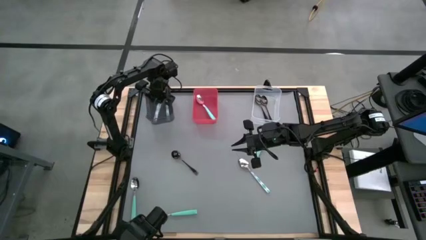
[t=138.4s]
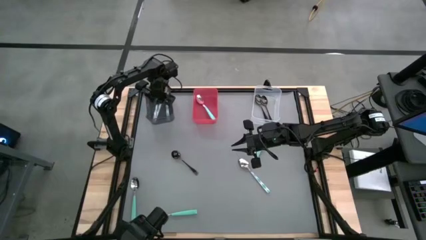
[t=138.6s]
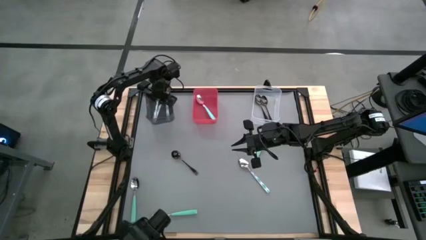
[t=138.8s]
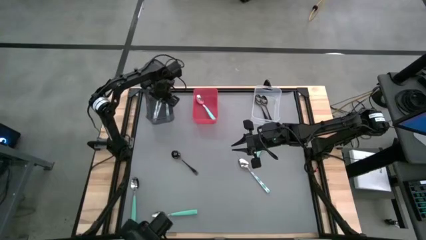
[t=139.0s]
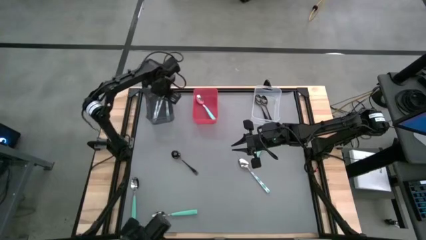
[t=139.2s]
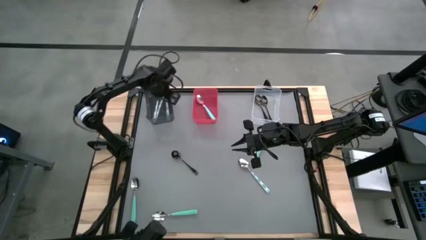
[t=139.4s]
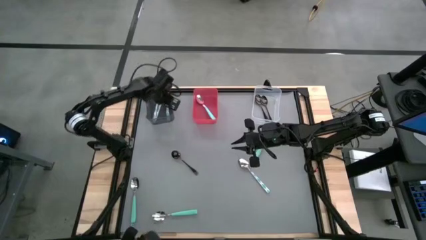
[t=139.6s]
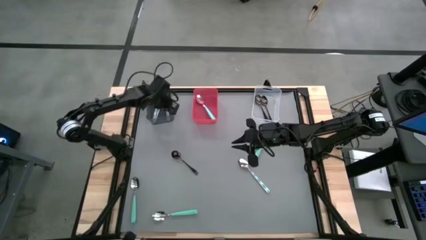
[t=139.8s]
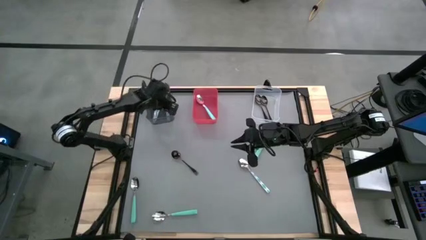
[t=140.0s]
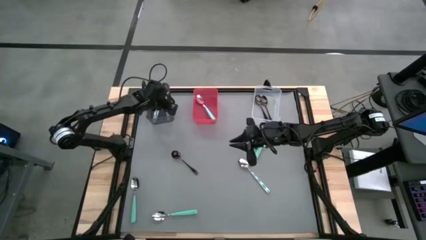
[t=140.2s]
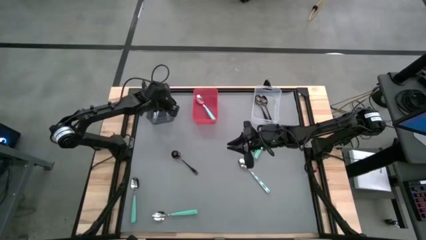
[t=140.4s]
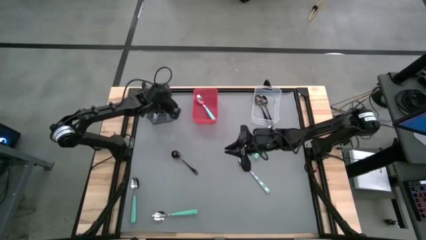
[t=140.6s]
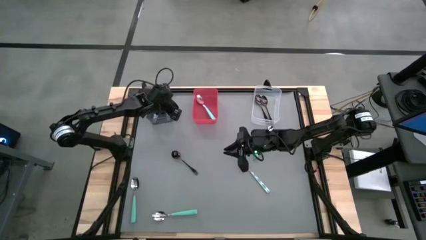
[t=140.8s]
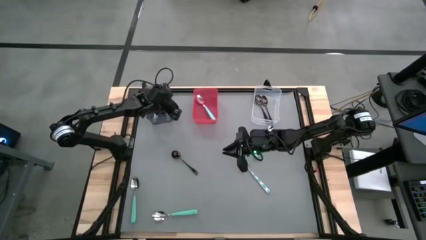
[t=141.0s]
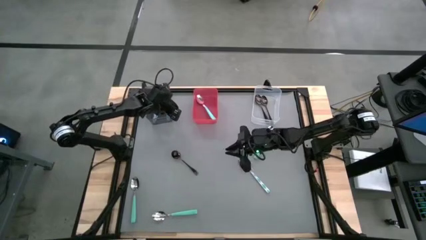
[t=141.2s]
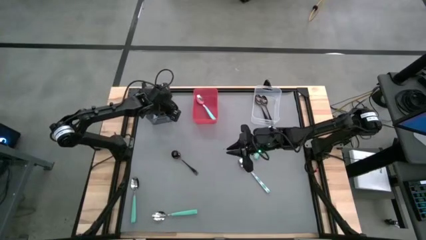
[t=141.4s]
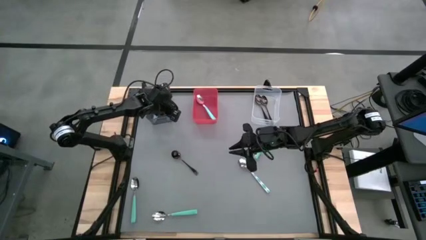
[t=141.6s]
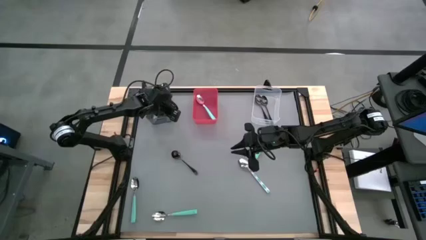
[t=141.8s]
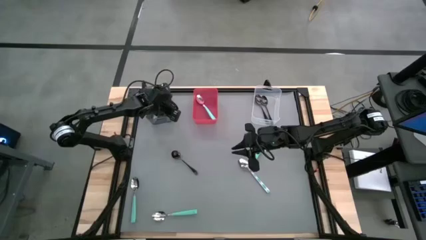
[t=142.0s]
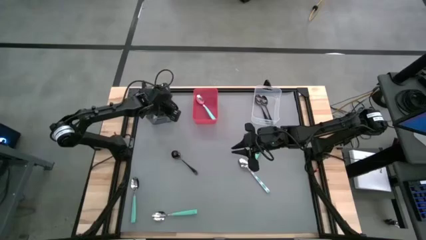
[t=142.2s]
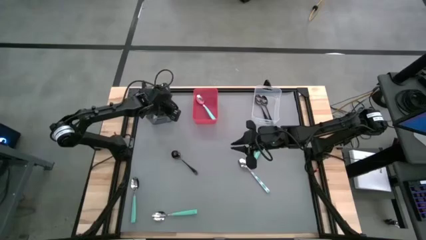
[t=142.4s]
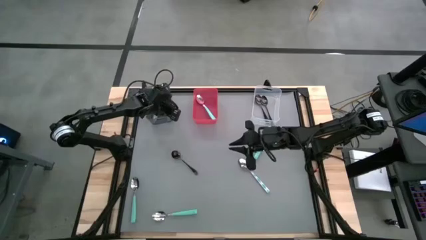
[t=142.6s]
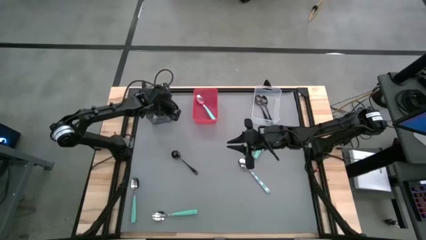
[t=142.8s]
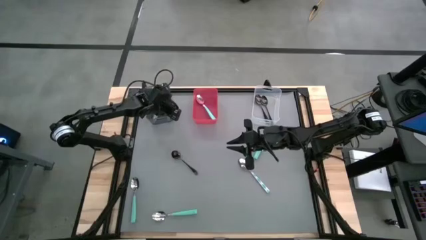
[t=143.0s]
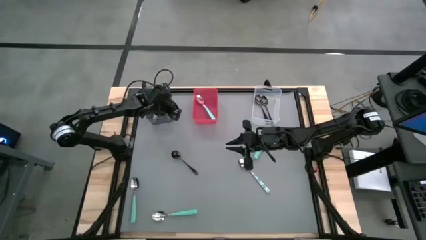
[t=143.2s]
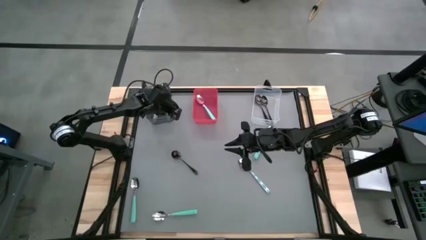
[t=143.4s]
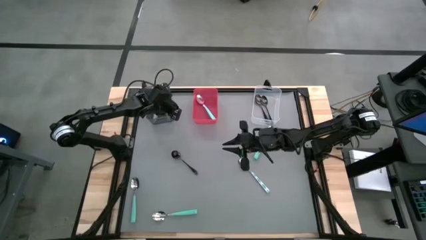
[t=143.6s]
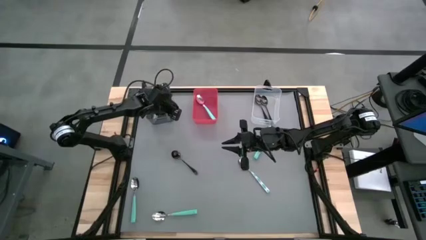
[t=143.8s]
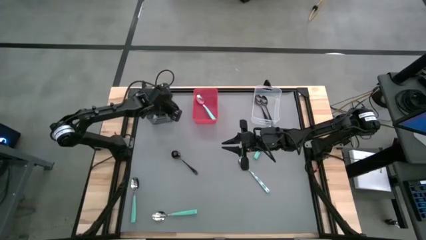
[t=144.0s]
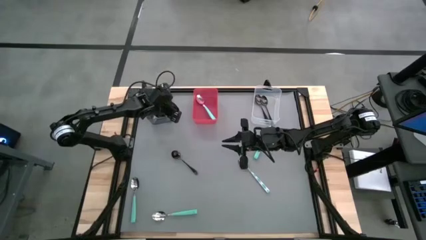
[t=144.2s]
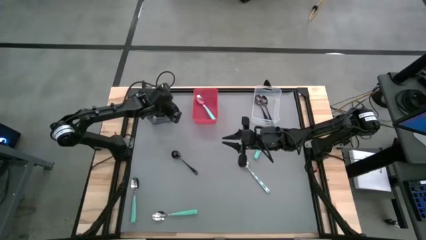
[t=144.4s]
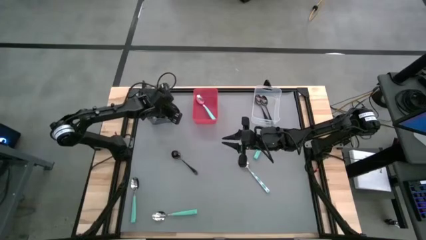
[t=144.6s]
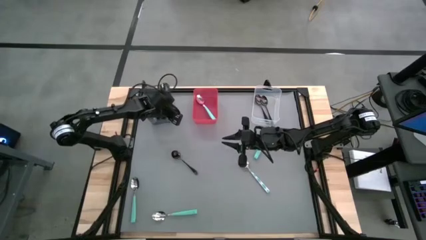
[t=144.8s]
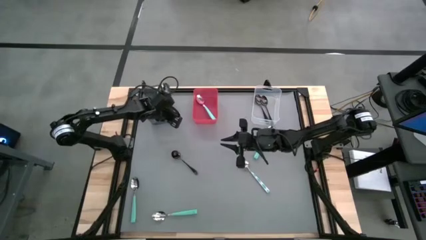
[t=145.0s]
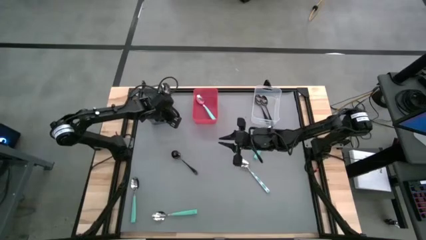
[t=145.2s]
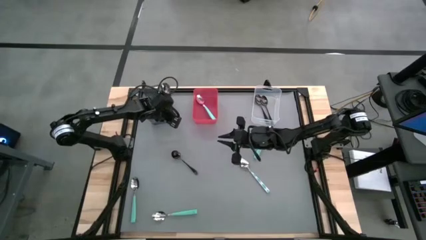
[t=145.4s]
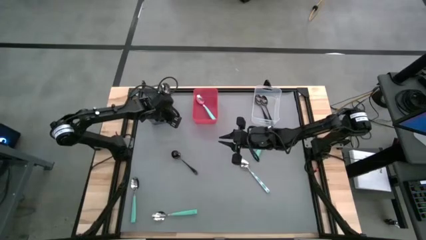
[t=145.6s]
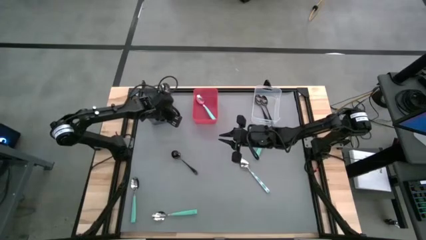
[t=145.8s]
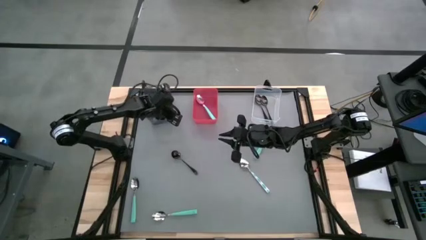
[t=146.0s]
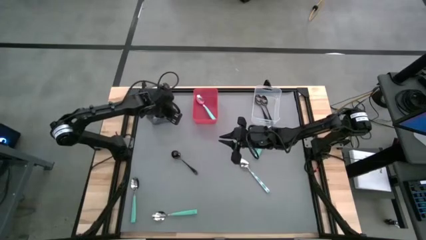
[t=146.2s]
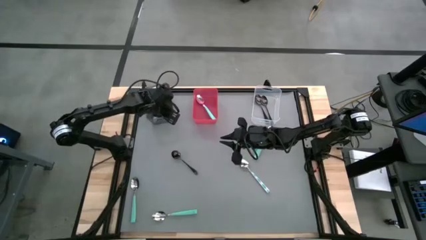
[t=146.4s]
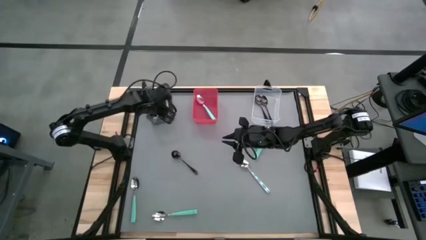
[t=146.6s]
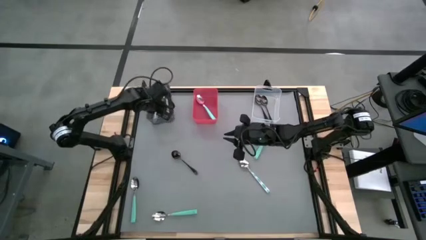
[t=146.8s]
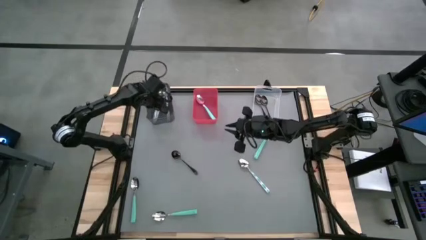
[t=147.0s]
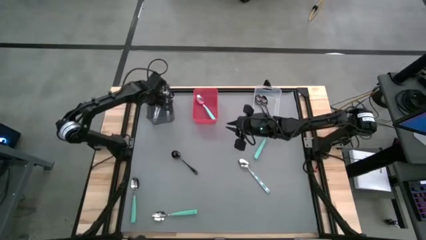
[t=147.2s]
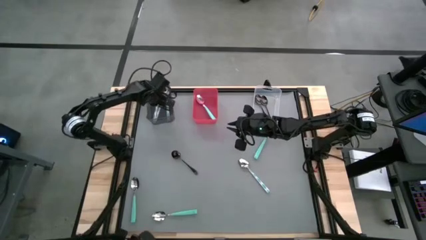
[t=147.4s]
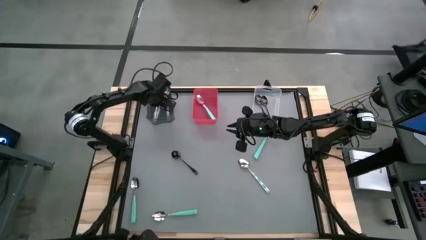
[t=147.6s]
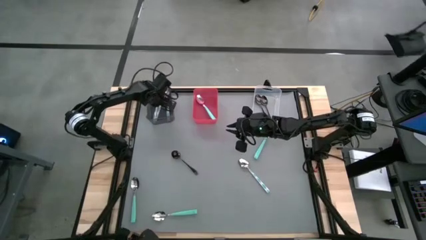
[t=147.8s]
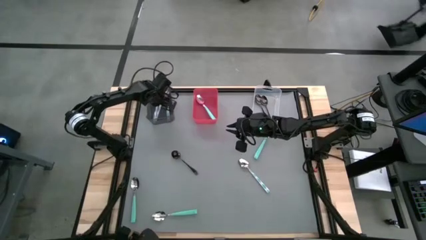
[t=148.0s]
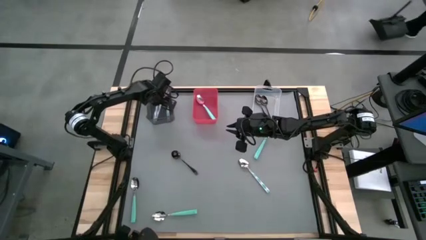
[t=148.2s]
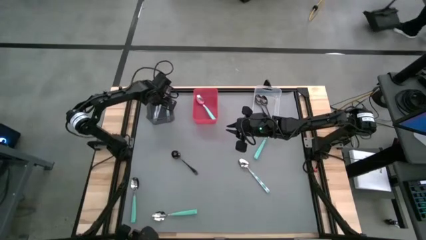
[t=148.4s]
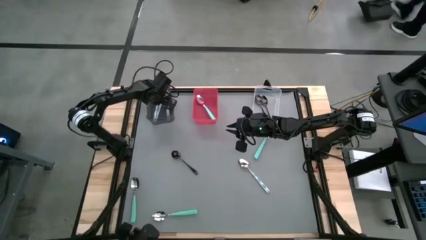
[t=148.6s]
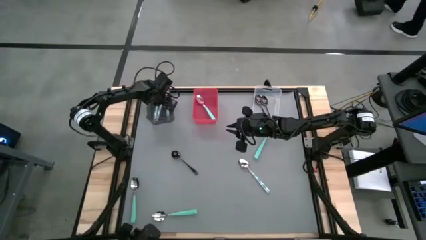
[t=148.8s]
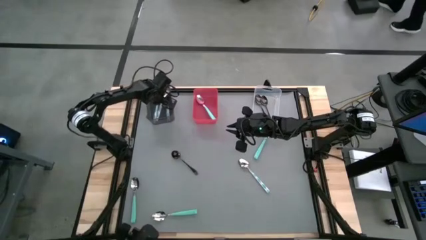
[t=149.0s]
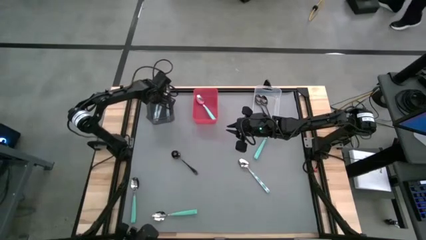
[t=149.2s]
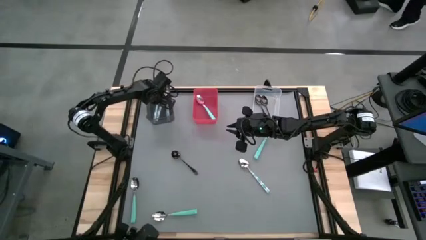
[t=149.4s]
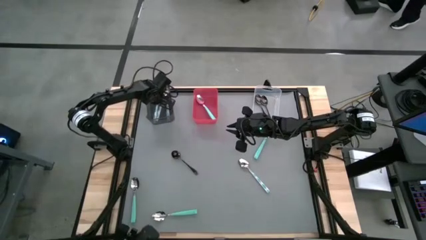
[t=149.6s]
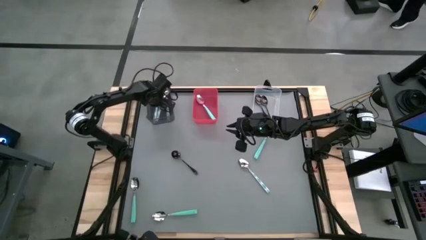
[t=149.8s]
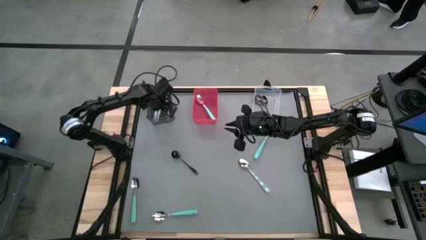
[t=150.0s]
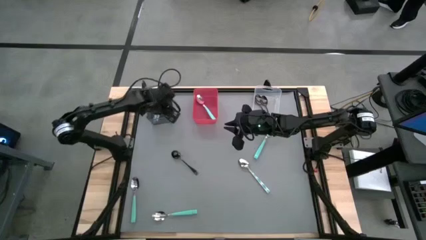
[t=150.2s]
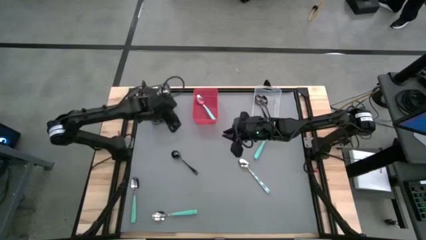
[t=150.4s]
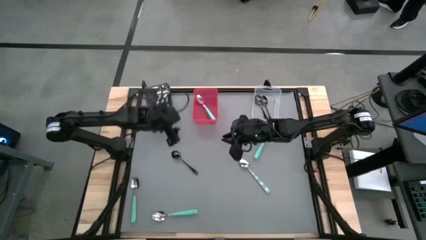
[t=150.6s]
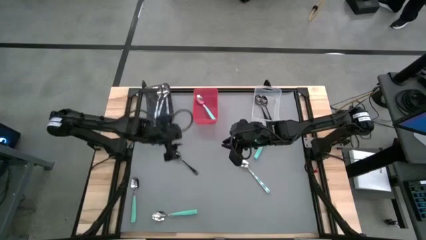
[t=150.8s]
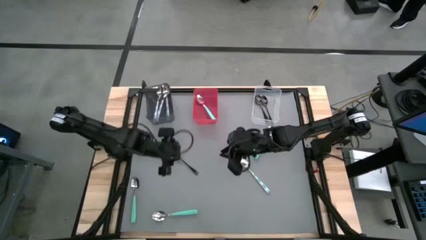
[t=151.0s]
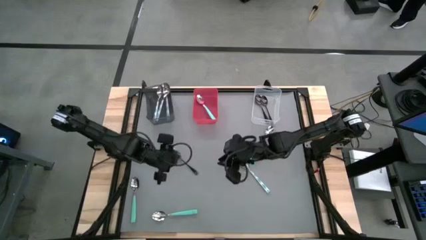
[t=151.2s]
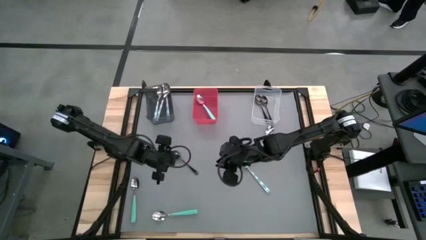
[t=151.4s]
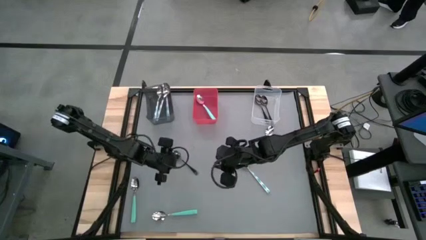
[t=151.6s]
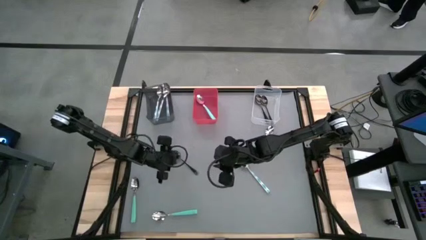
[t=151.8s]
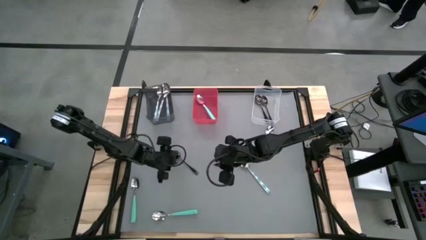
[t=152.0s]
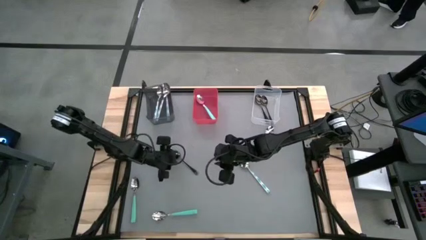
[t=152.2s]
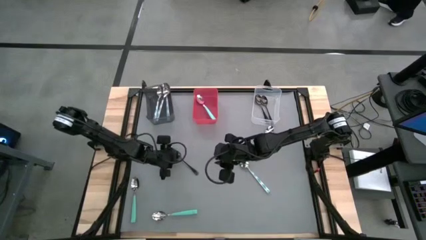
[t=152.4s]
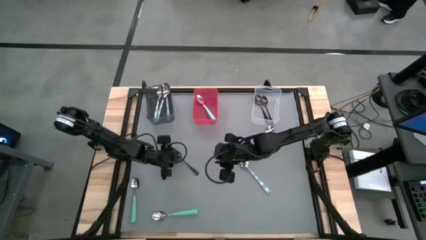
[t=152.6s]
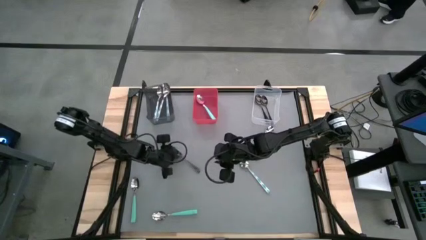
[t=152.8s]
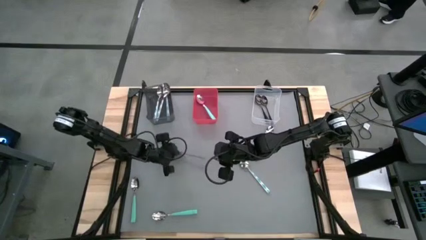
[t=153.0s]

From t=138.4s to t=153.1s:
Task: Sort silverware by color (type)
Put the black spoon into the transparent bin
